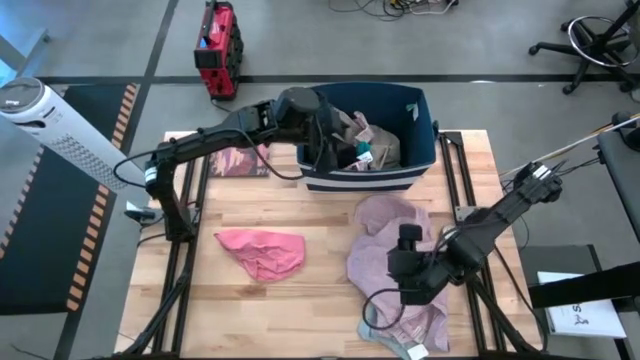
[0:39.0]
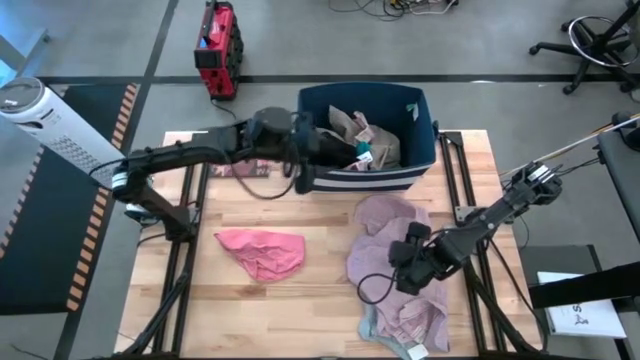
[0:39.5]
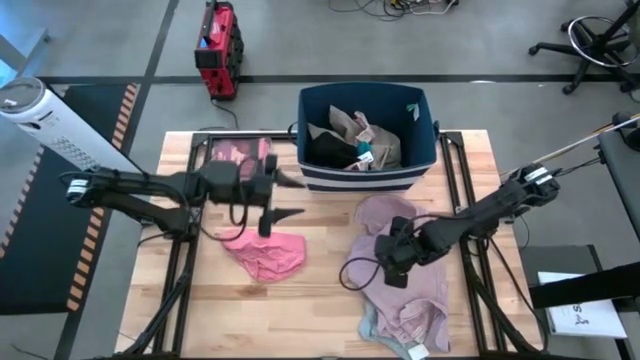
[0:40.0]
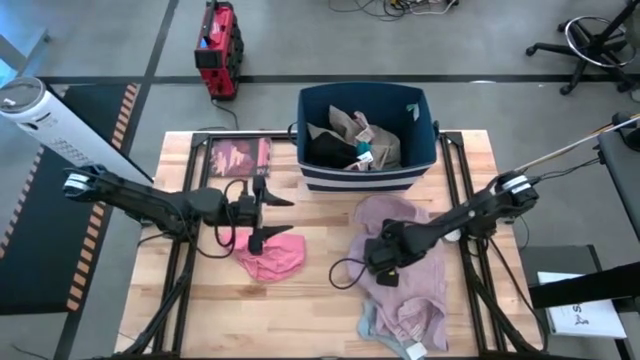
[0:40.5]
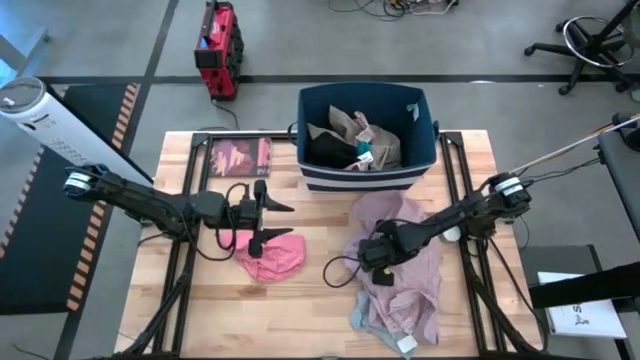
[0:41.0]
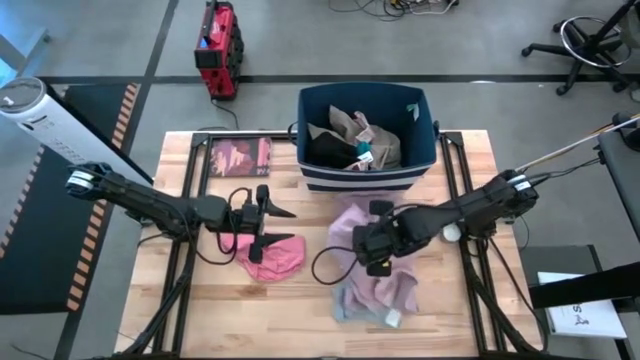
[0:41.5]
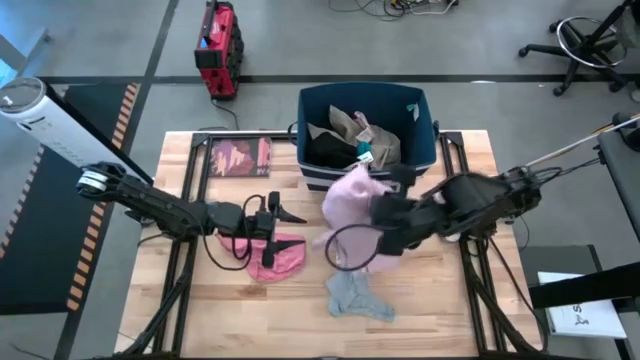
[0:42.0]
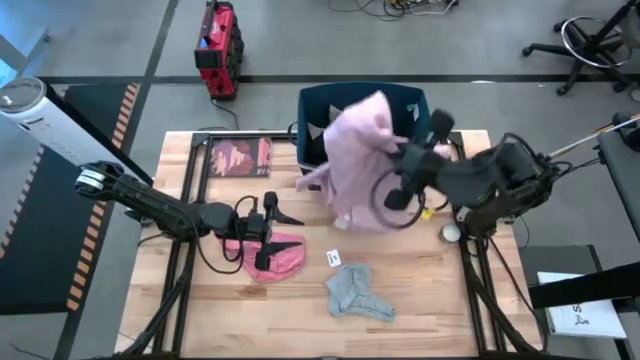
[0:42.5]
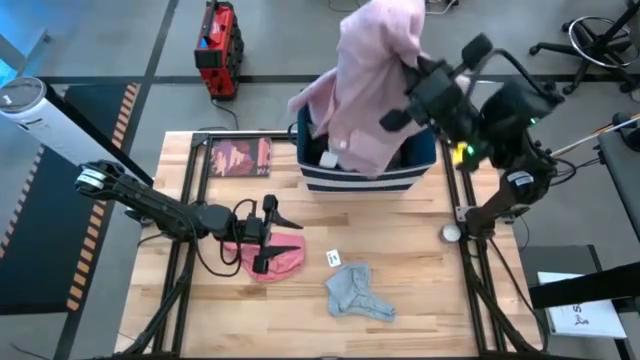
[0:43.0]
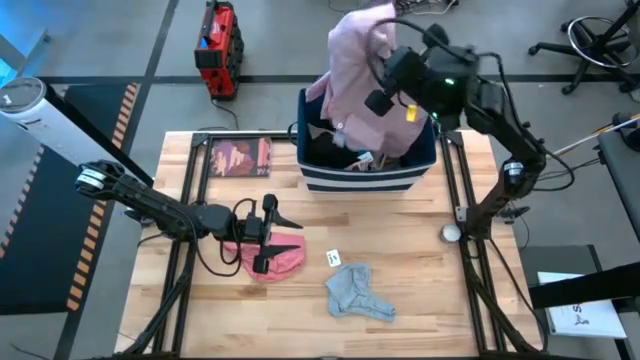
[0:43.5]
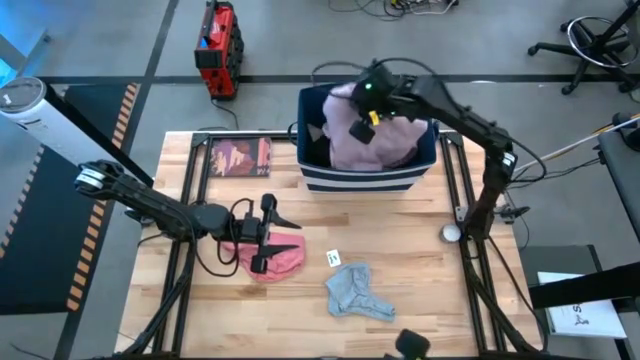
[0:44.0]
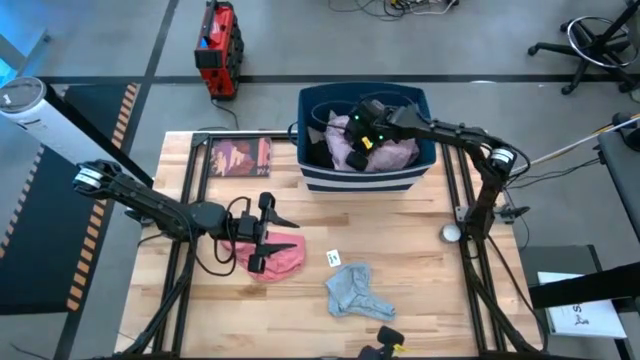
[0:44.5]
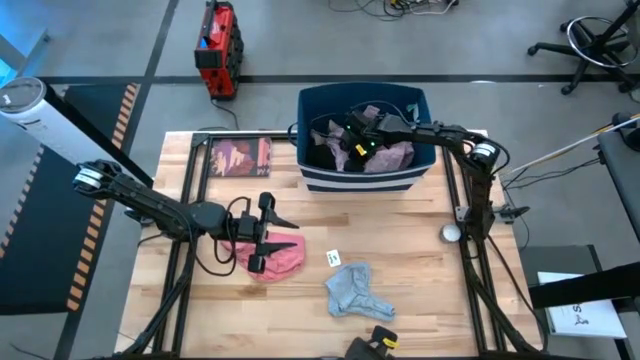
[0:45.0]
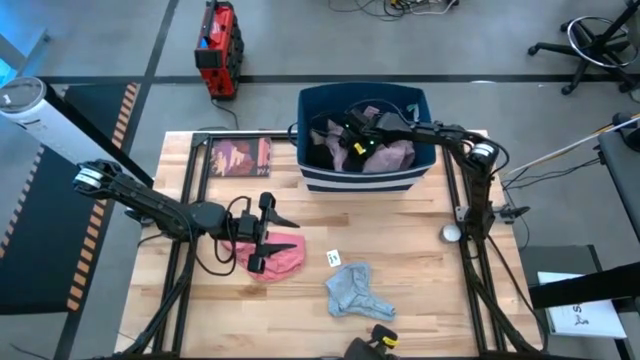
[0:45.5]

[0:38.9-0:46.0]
Task: Sort clothes
Put the pink polo shirt into the blue laundry bin

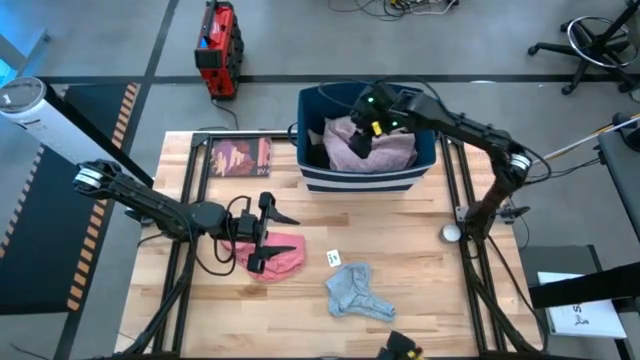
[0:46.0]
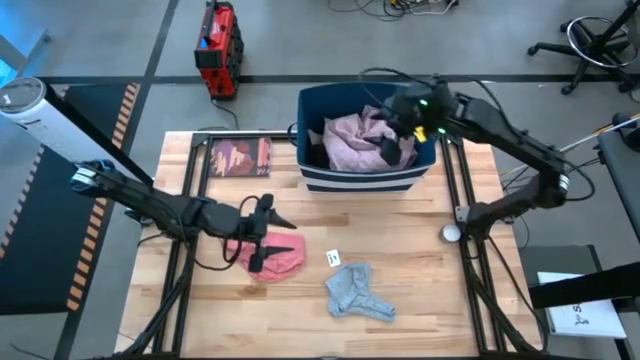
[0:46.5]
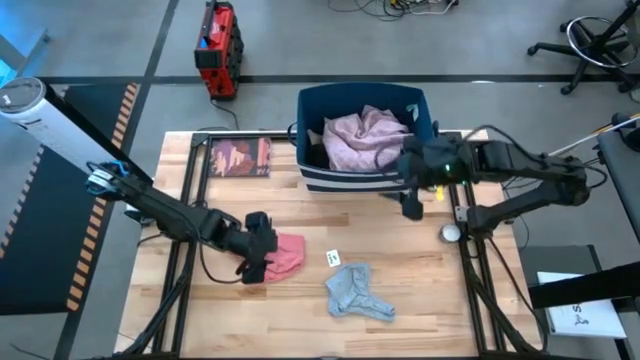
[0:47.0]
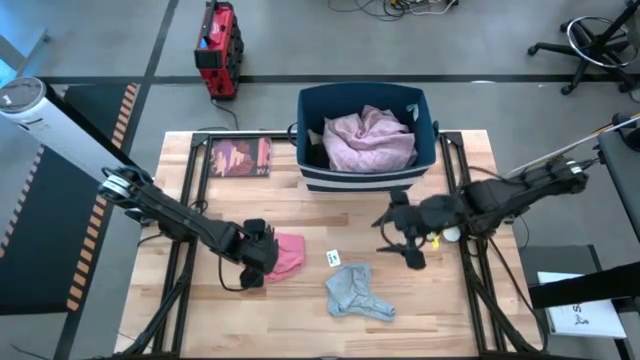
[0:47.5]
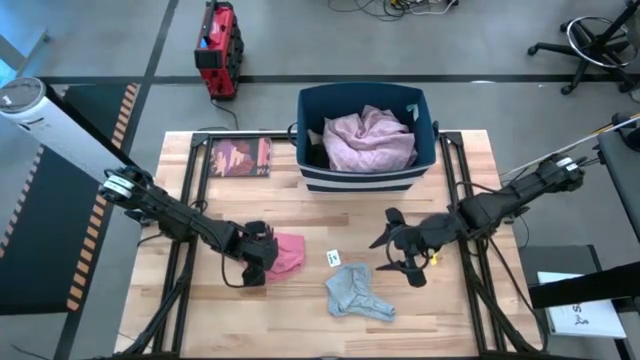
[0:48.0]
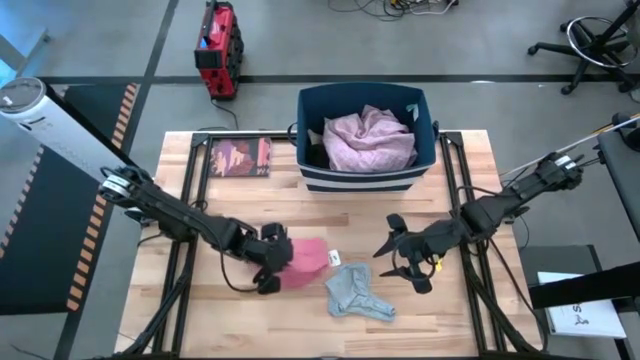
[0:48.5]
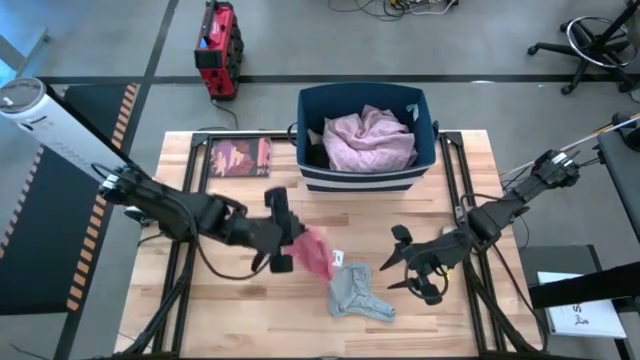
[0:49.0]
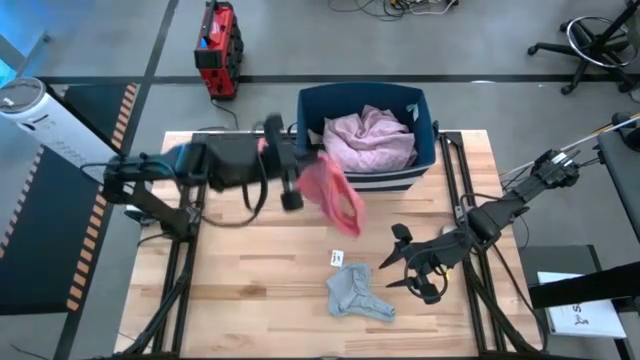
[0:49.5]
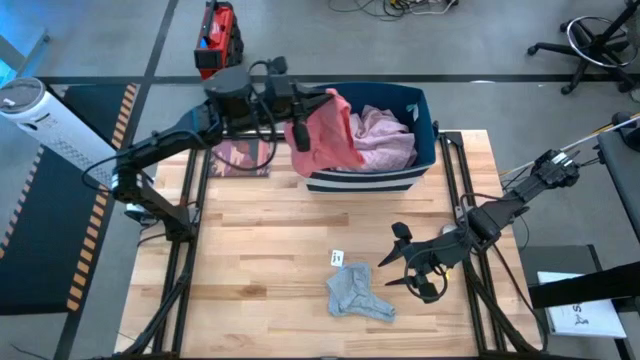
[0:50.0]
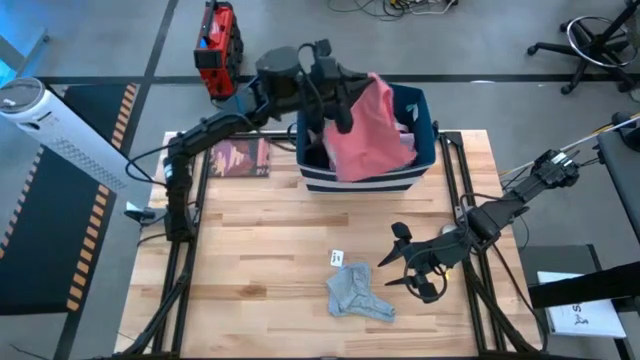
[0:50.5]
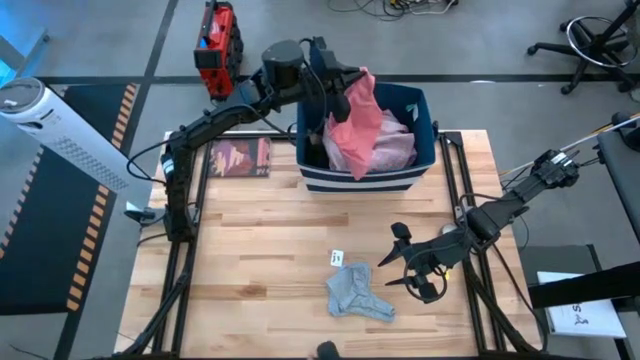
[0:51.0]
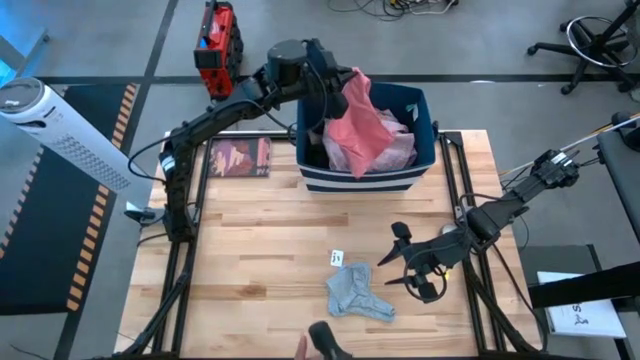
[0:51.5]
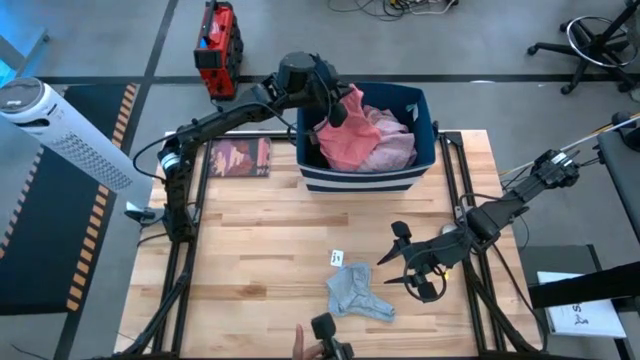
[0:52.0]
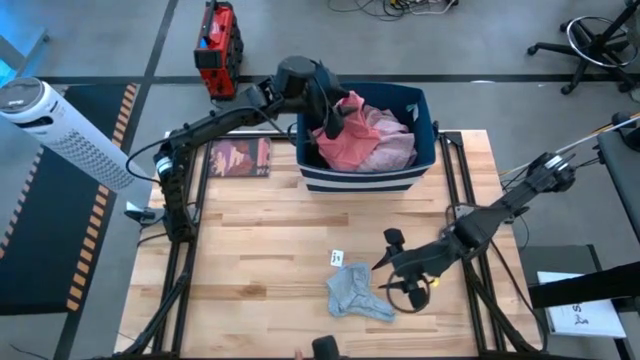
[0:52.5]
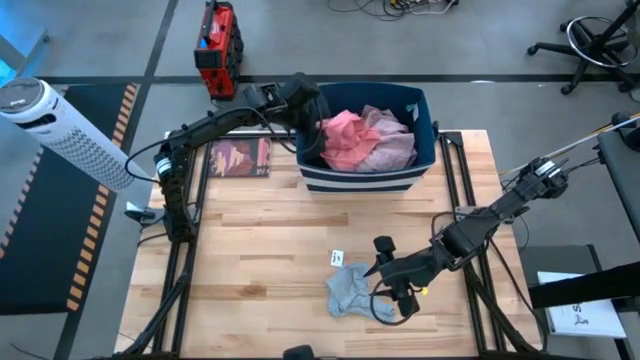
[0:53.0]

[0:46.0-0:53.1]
Put the pink underwear into the blue laundry bin

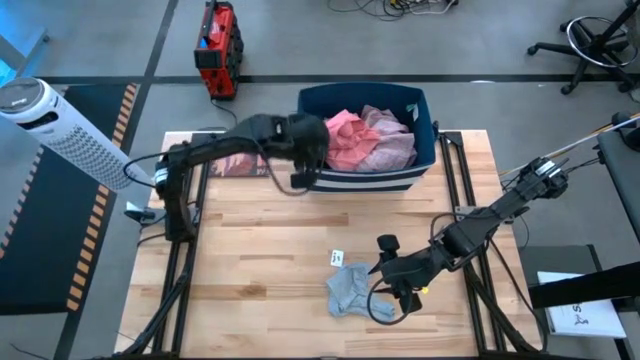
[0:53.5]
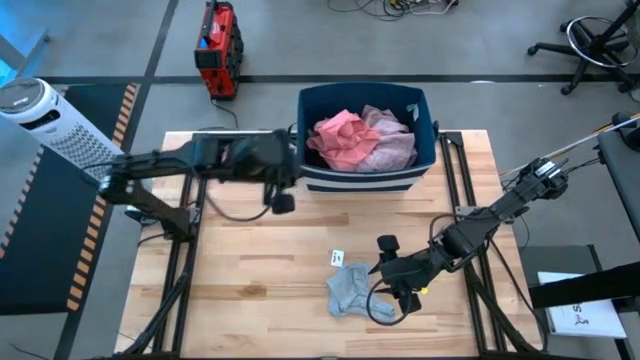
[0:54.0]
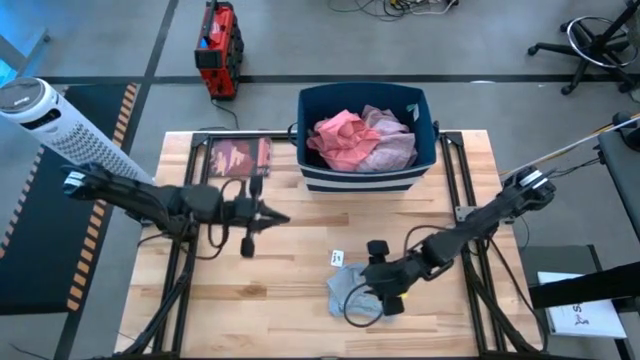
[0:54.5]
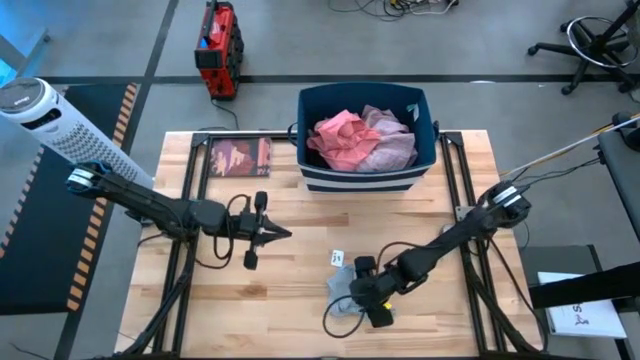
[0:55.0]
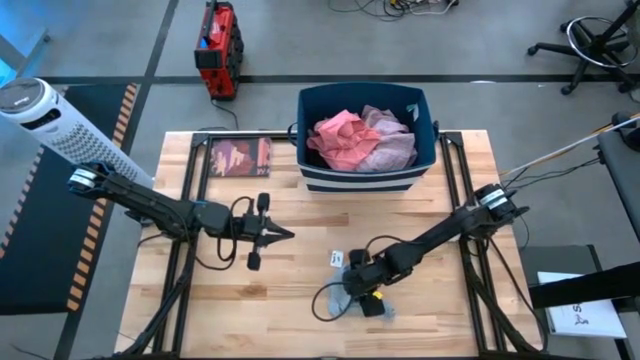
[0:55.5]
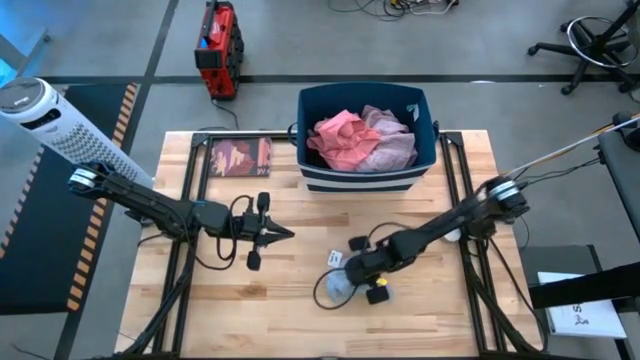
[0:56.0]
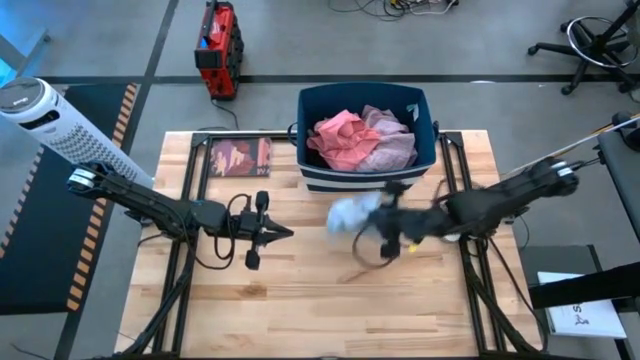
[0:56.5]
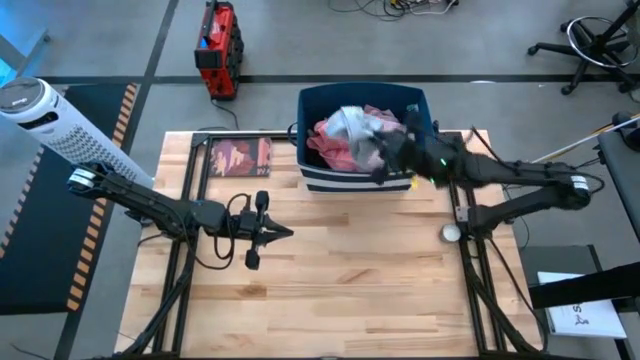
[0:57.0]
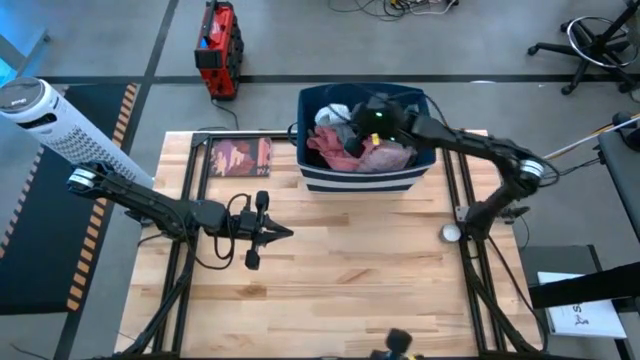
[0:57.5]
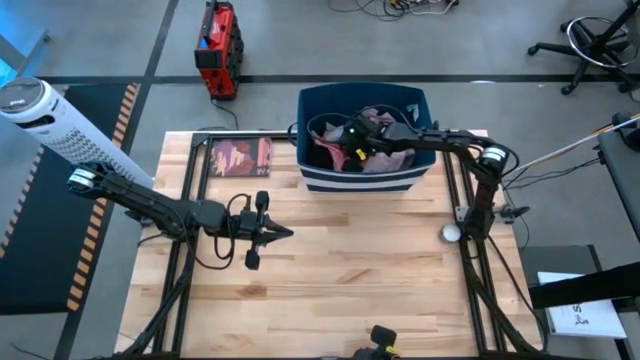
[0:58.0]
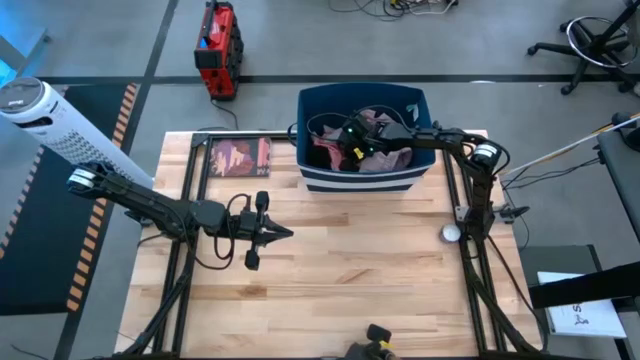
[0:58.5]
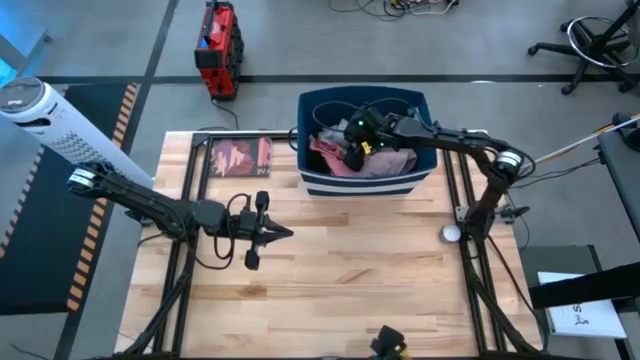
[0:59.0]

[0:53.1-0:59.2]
Put the gray underwear into the blue laundry bin
